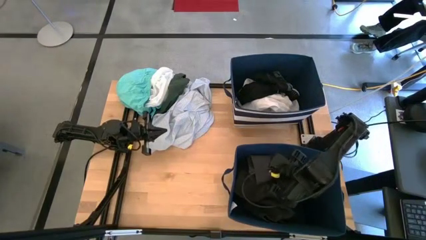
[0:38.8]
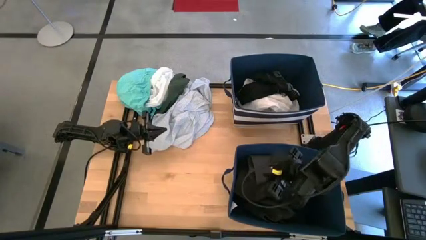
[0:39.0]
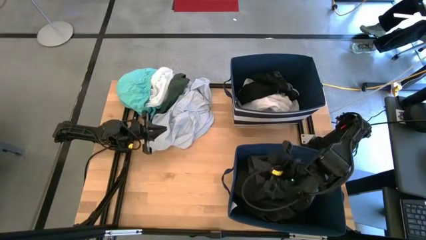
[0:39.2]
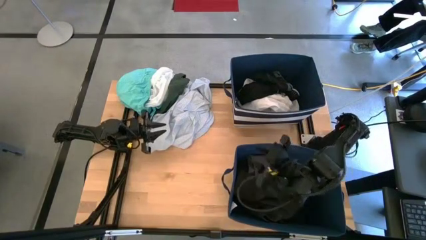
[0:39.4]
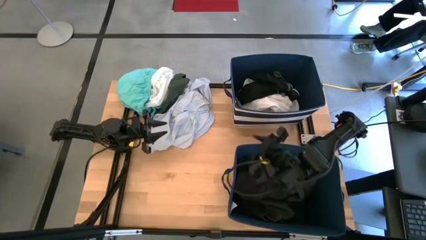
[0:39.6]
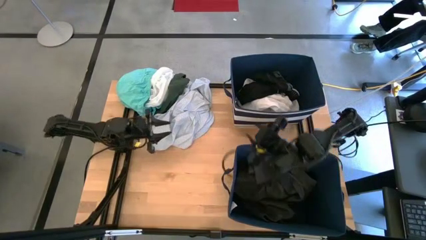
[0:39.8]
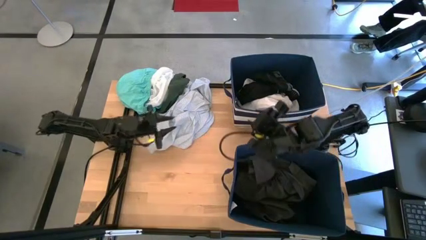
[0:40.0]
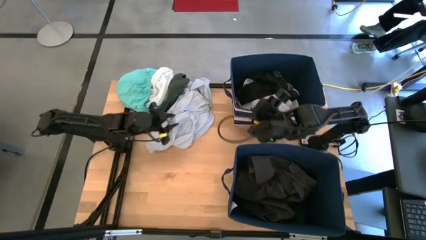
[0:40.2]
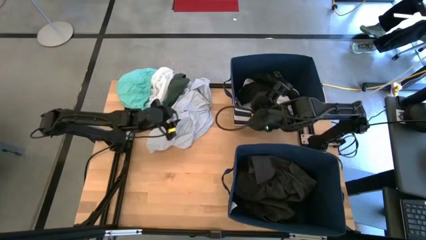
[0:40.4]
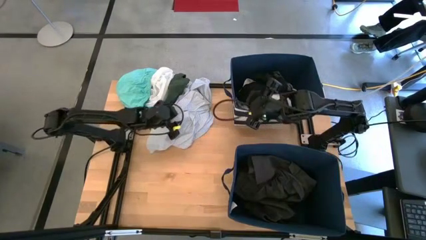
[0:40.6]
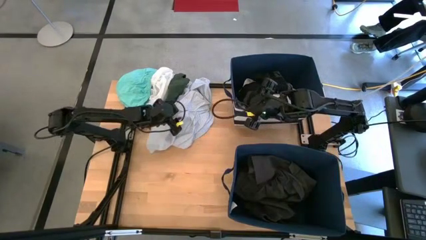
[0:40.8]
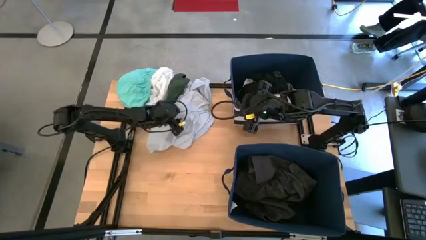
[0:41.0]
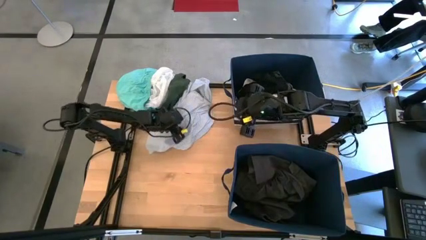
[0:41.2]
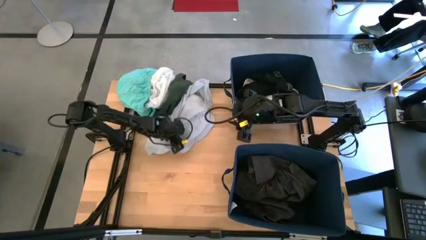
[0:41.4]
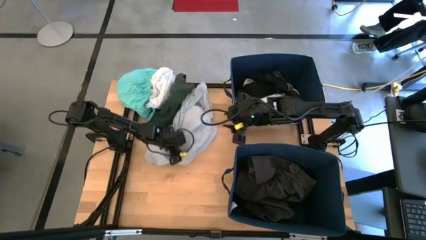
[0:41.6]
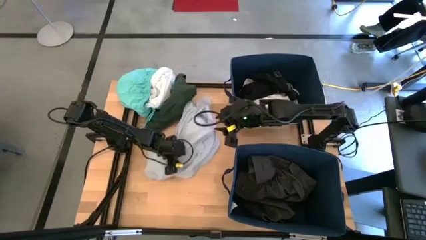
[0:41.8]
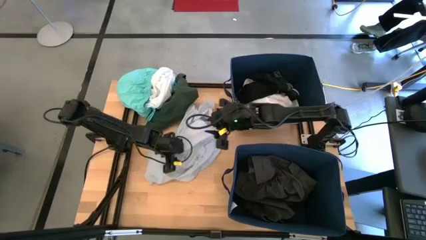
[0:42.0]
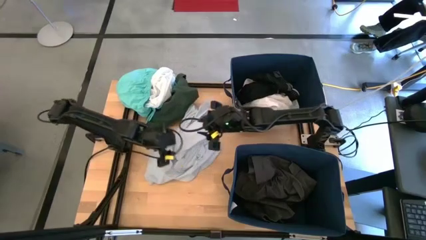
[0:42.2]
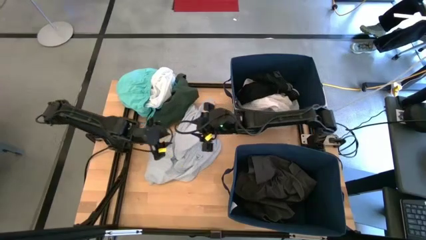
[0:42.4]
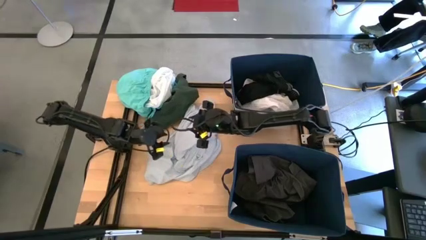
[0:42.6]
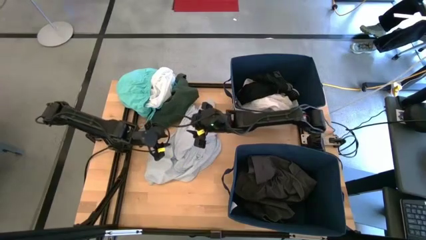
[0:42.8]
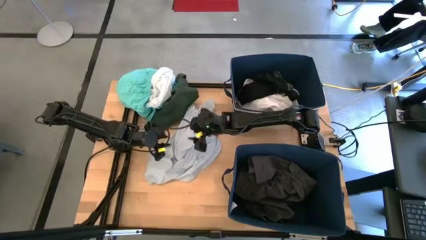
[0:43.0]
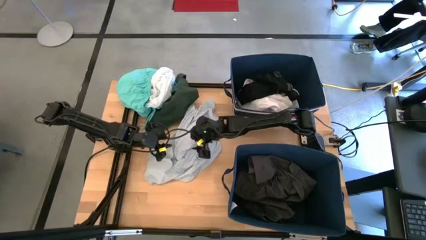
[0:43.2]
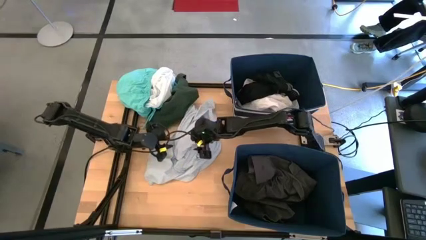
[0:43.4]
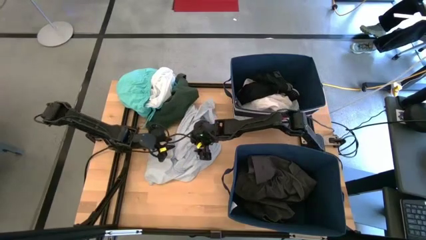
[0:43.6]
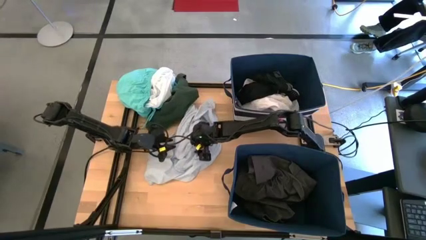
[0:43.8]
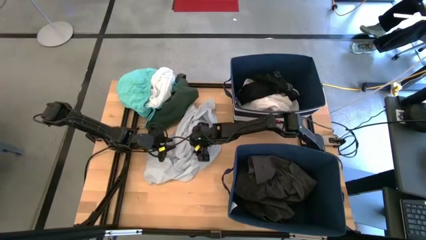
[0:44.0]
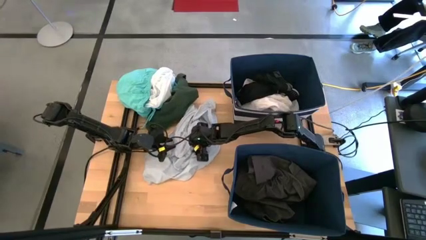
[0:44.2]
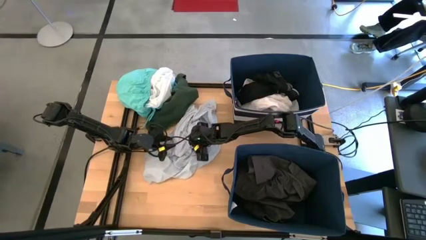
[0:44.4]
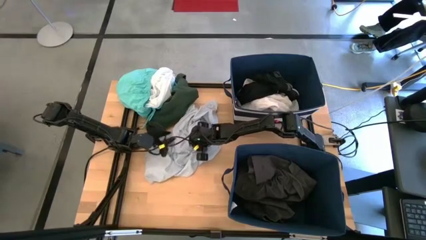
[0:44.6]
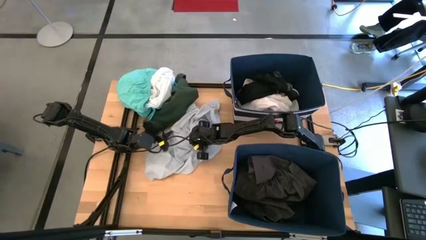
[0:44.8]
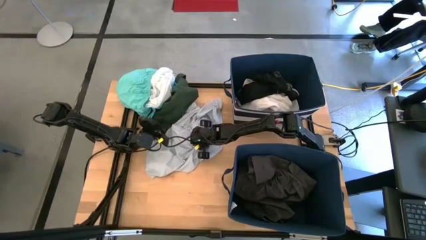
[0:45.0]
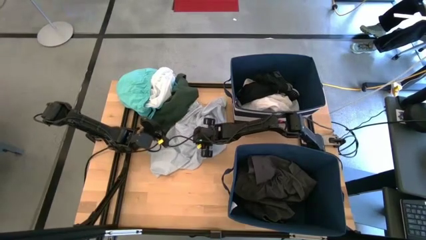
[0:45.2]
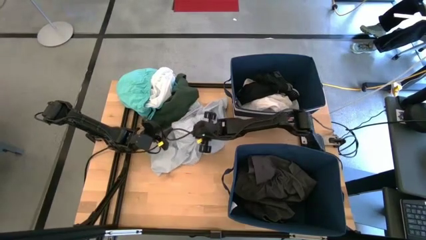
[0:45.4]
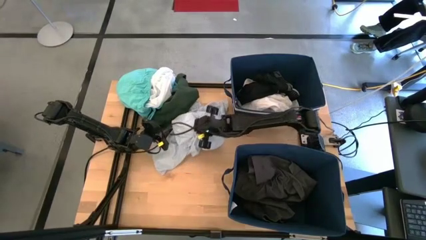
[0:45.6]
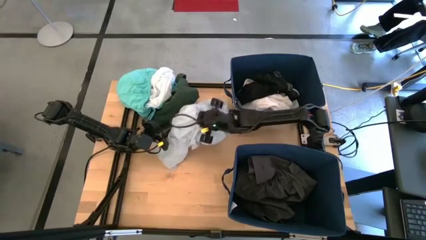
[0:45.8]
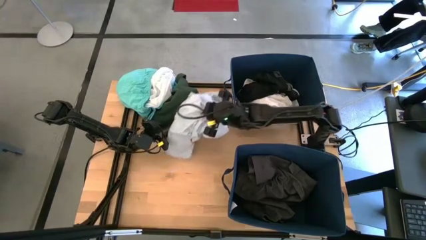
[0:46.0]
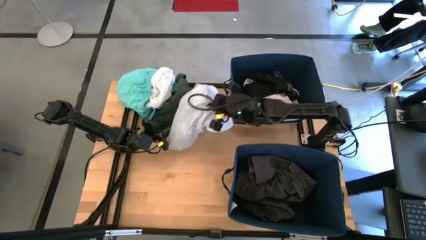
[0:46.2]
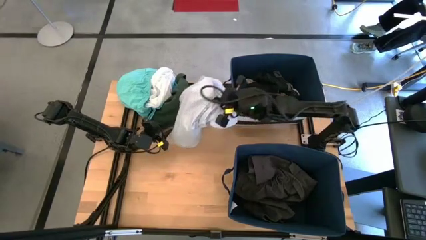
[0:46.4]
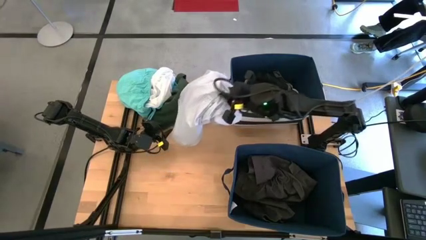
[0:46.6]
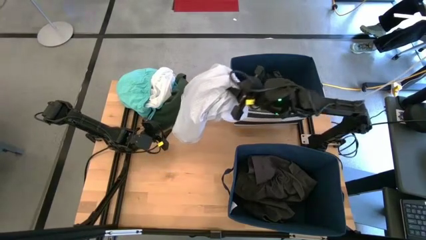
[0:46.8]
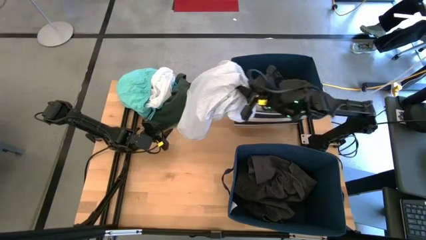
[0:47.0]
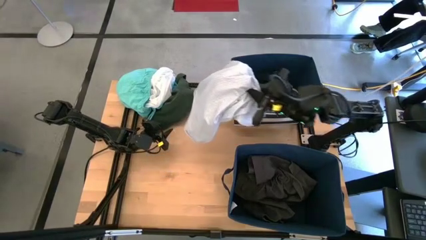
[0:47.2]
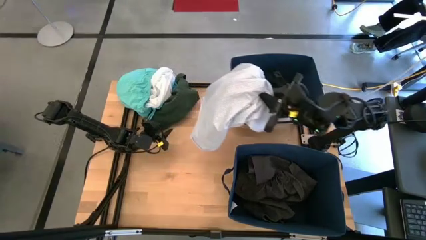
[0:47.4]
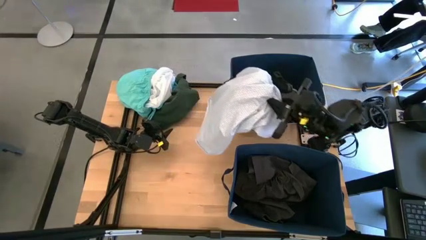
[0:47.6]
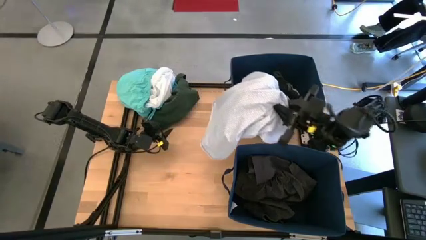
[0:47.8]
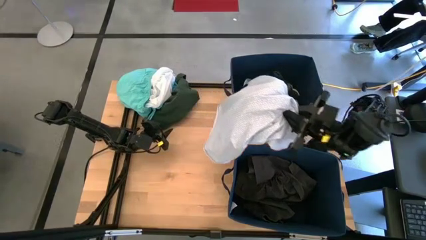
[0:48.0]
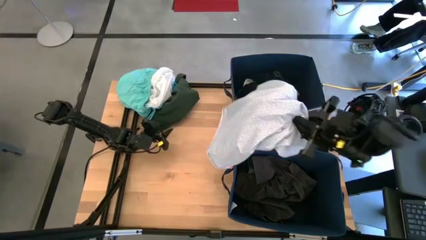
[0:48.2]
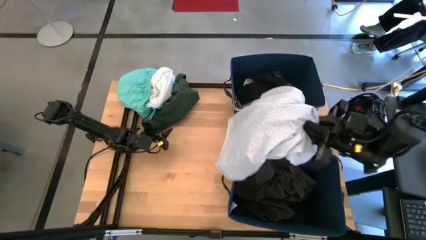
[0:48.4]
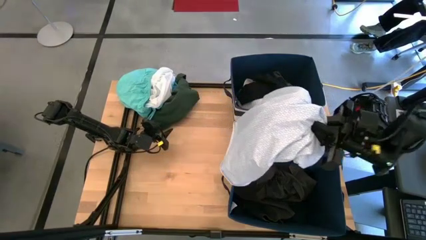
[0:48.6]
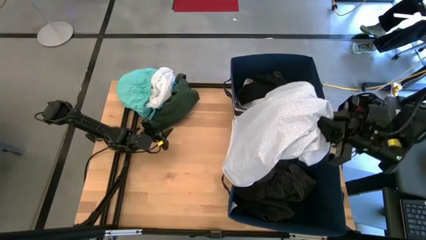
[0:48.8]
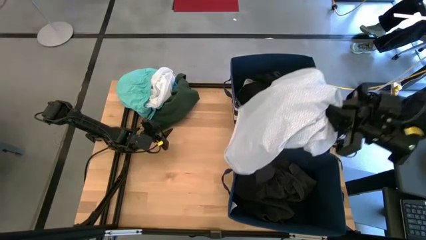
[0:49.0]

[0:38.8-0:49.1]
Task: Sort clothes
Put the blue patient gown into the bottom blue laundry organizer
